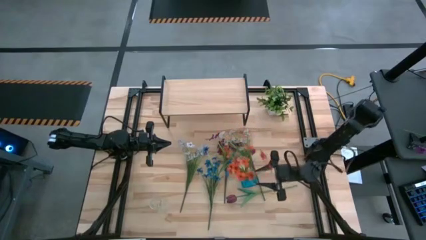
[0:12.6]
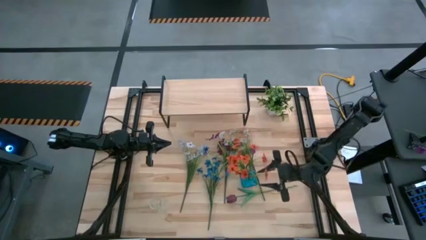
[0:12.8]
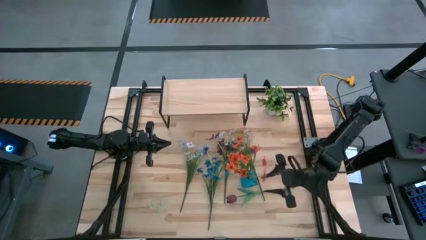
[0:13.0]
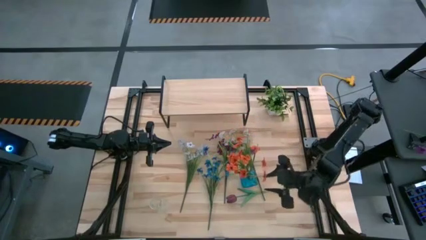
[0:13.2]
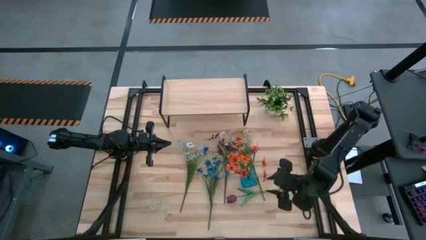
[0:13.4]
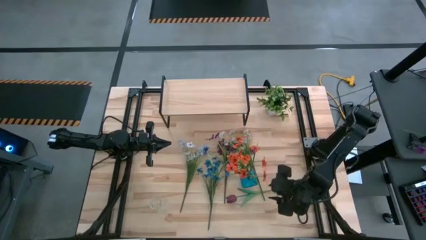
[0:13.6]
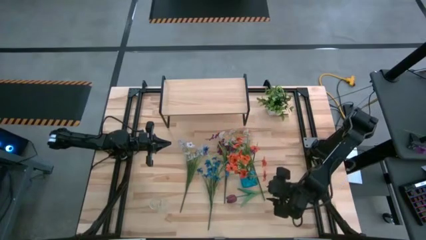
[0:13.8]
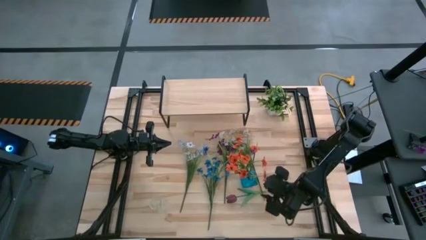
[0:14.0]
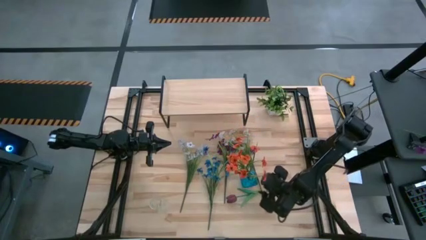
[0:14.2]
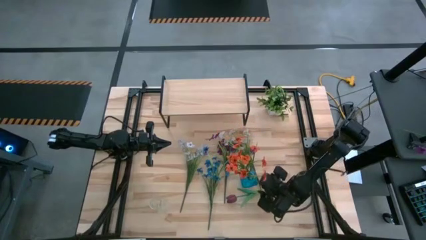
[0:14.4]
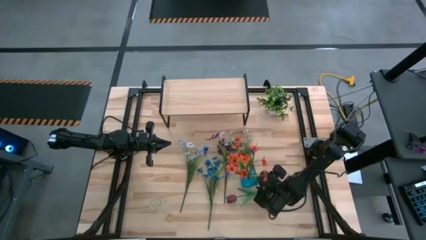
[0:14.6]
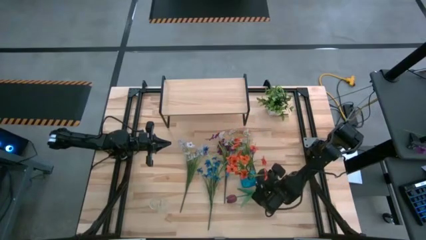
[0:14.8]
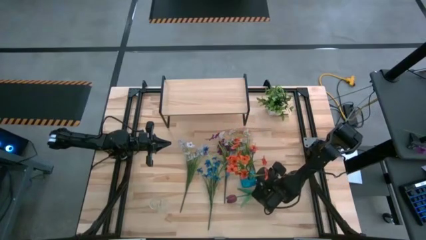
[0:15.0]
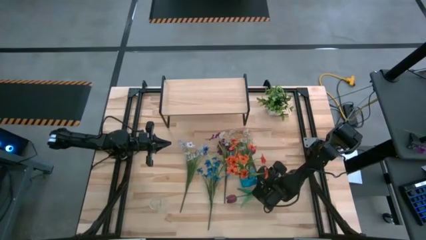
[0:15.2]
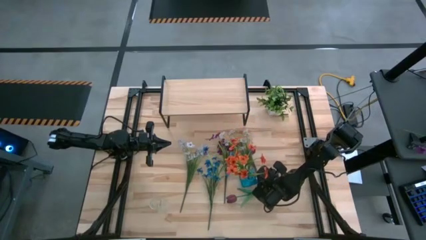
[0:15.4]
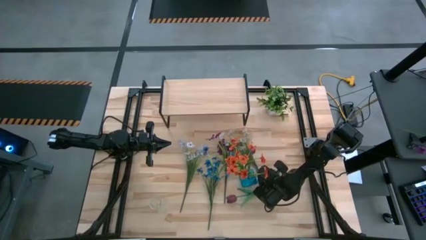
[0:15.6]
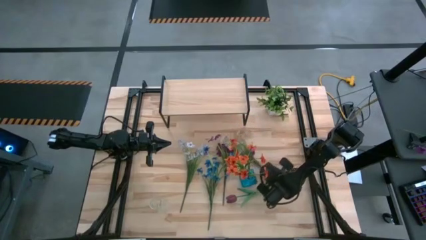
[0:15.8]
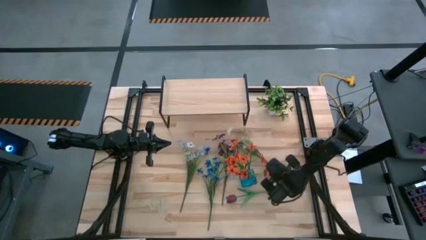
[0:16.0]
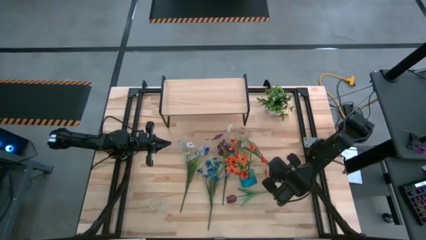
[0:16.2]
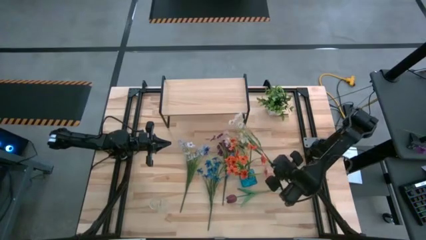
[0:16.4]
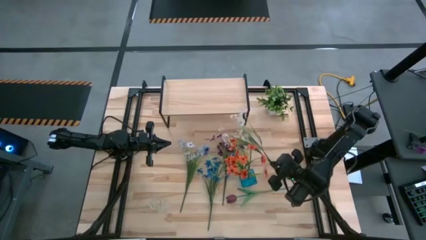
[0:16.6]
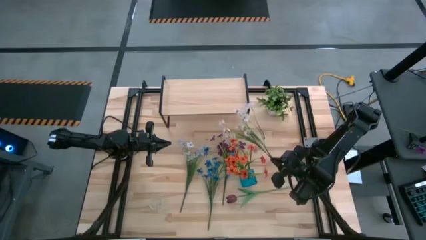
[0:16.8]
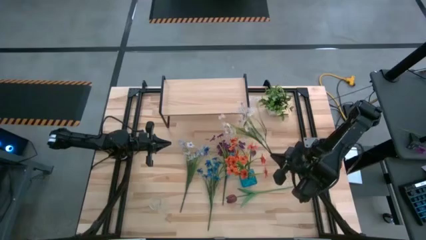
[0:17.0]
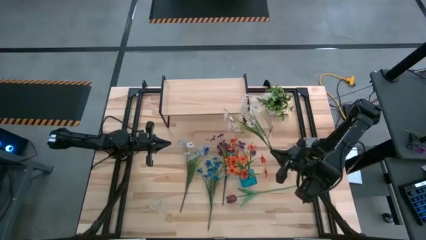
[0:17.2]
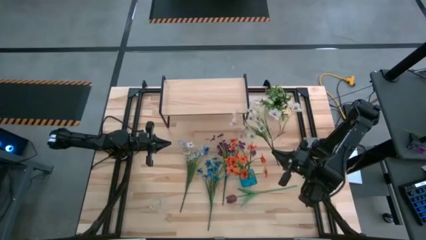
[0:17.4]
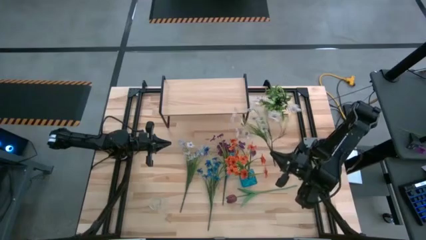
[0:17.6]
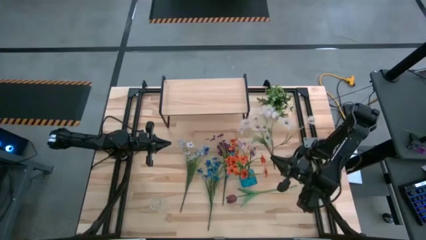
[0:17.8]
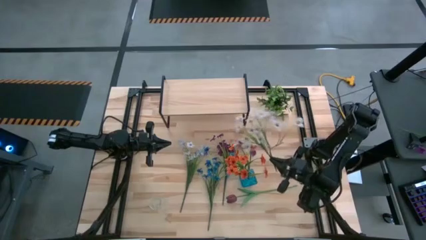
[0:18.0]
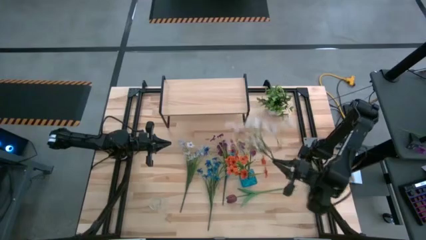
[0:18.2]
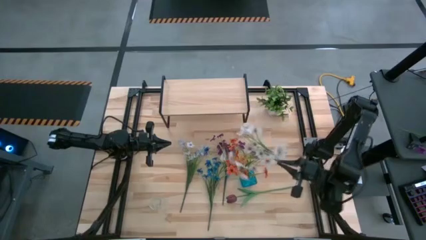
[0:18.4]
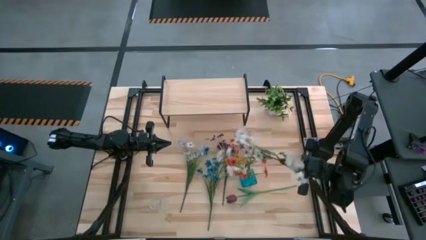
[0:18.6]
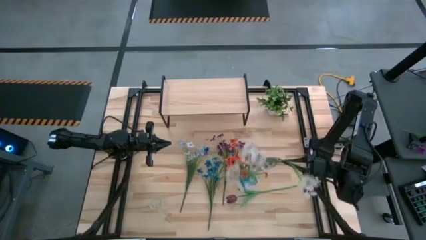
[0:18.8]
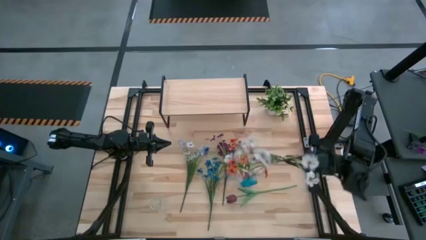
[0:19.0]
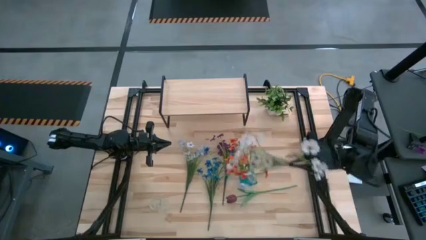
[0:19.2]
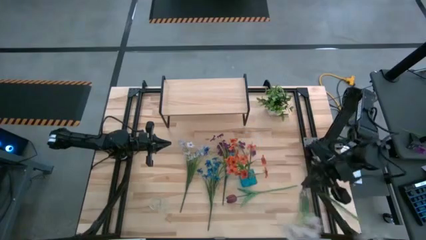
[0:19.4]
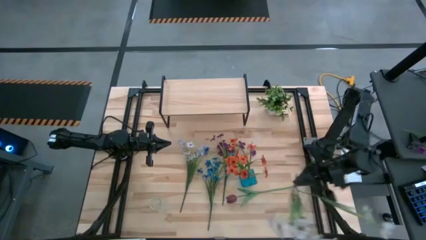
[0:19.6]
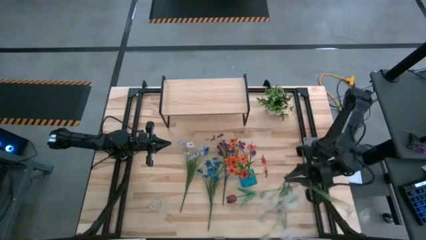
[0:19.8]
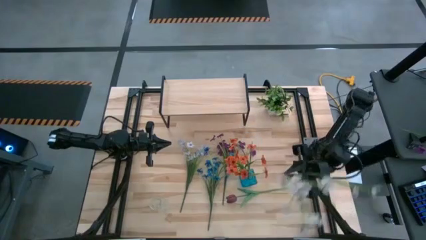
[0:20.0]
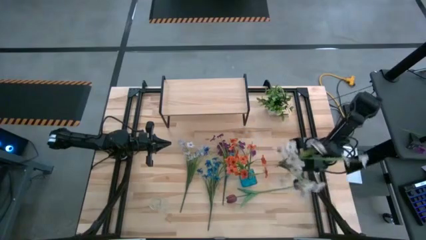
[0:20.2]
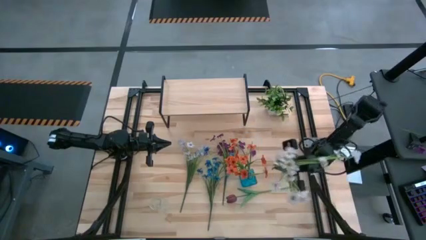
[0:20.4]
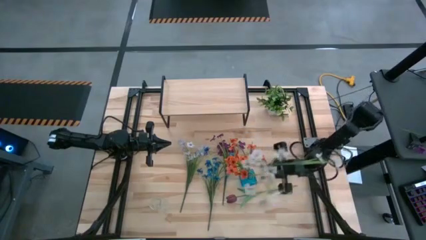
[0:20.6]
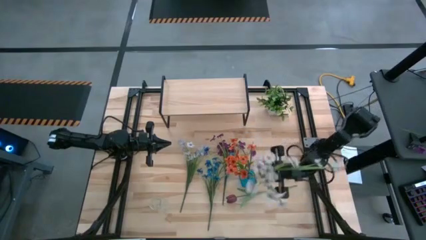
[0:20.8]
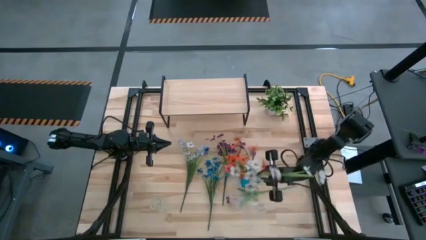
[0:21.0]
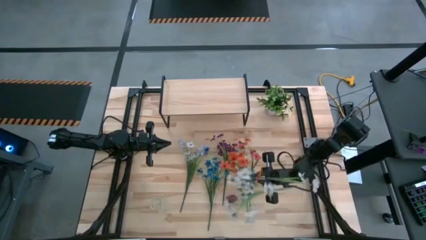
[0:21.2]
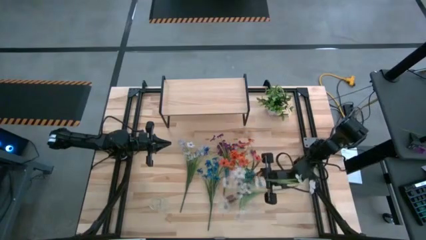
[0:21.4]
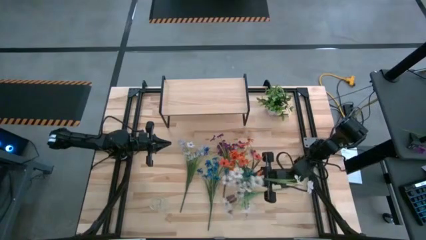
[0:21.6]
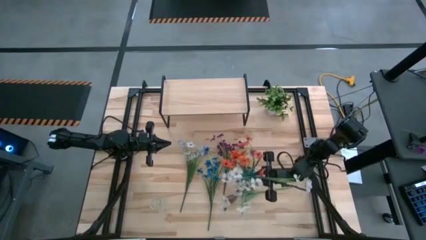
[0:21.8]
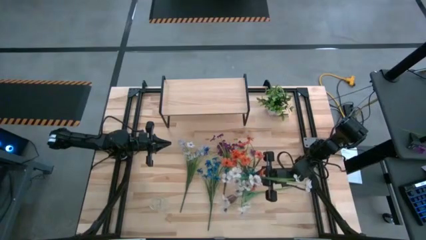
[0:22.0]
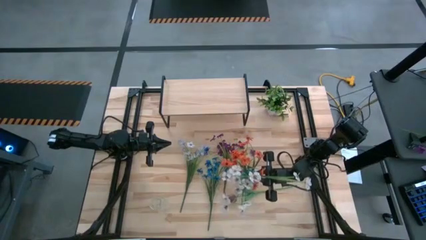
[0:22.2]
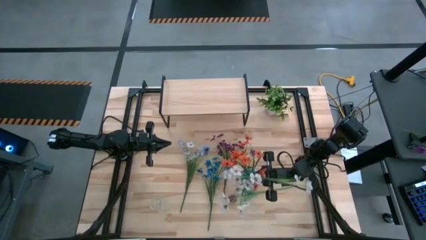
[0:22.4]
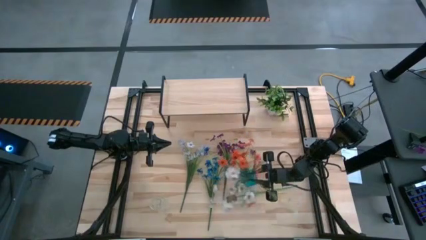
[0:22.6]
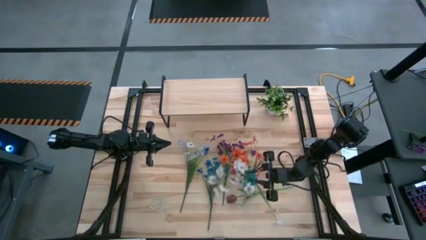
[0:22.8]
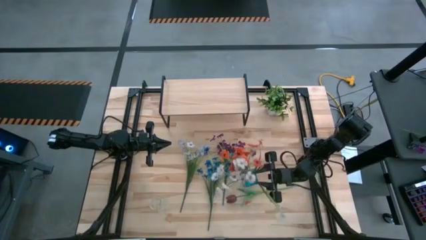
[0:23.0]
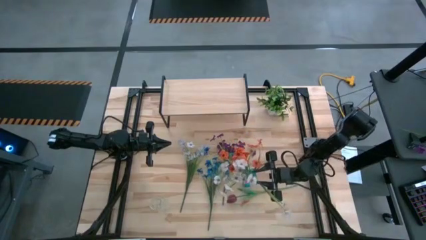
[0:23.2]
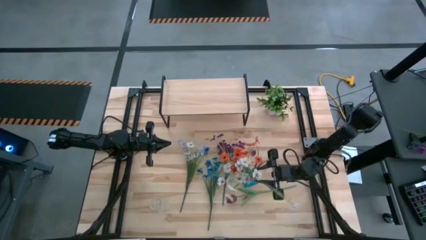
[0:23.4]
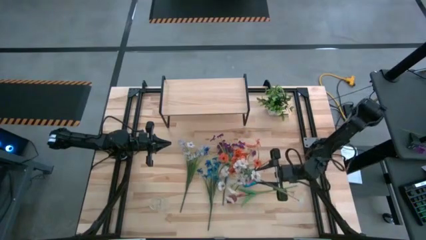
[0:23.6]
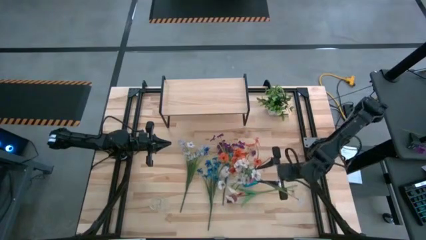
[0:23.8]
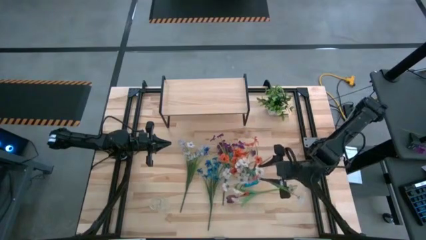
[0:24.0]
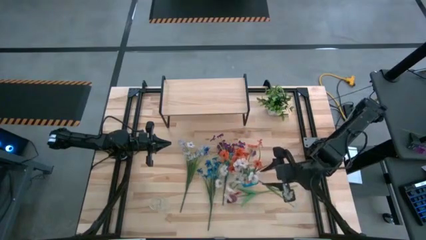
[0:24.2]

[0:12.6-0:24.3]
Task: Pick and place flowers into a vace then onto a shelf
Put the right white flowers into the blue vase

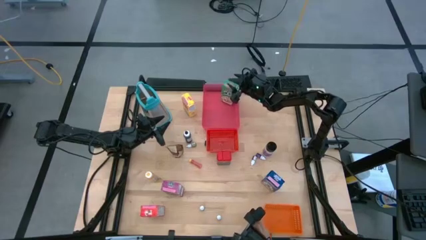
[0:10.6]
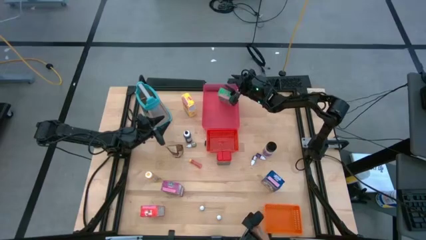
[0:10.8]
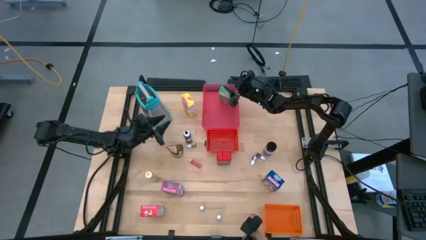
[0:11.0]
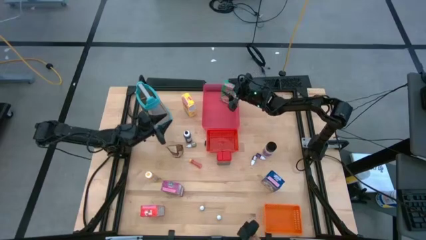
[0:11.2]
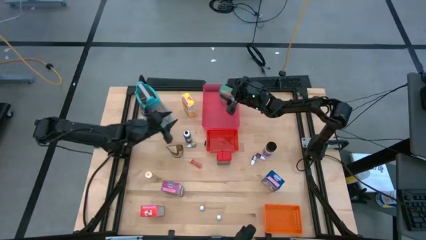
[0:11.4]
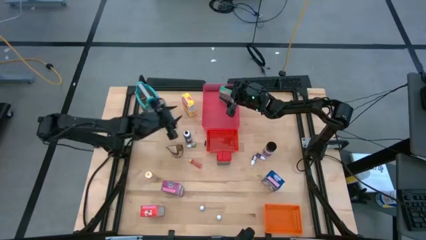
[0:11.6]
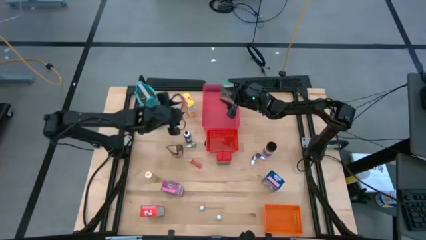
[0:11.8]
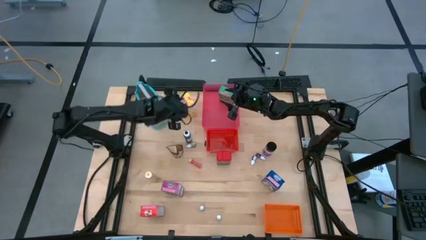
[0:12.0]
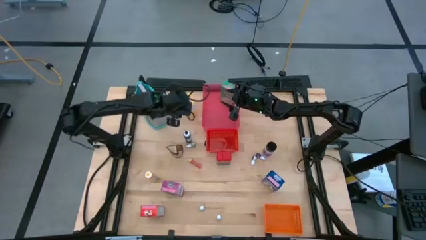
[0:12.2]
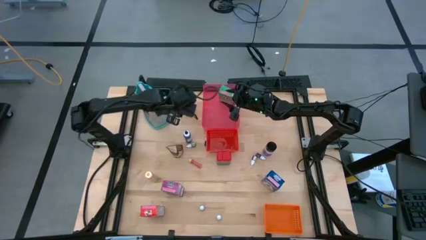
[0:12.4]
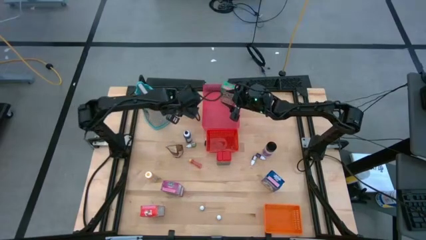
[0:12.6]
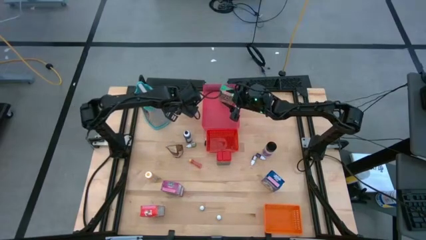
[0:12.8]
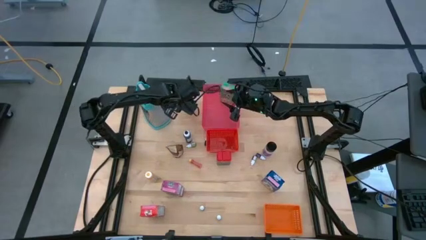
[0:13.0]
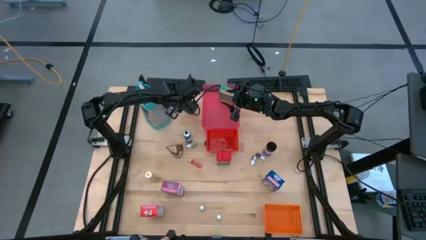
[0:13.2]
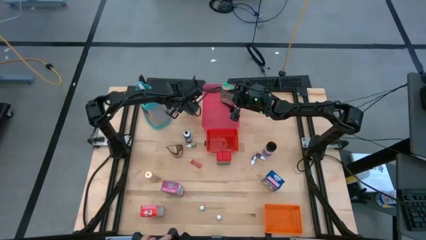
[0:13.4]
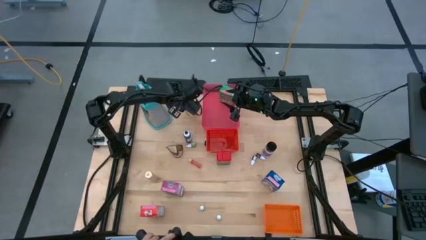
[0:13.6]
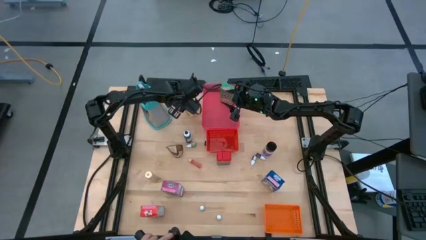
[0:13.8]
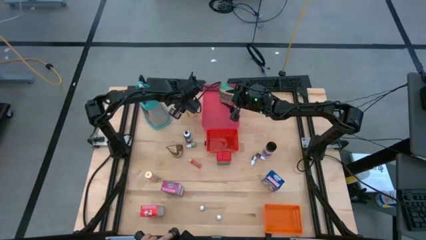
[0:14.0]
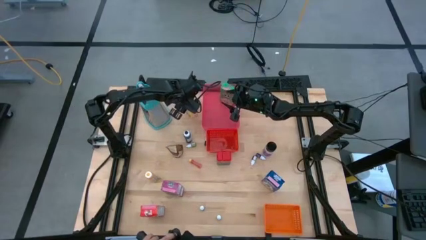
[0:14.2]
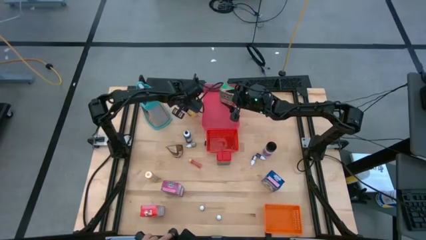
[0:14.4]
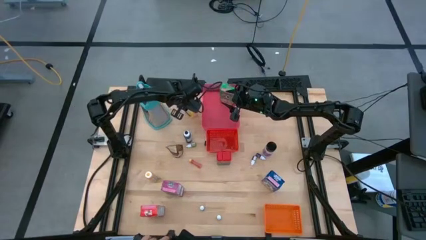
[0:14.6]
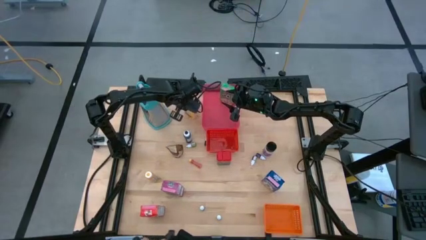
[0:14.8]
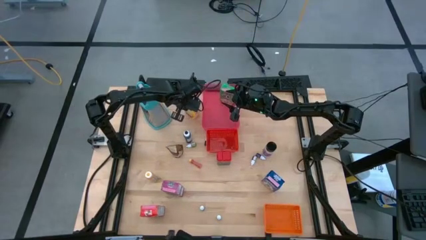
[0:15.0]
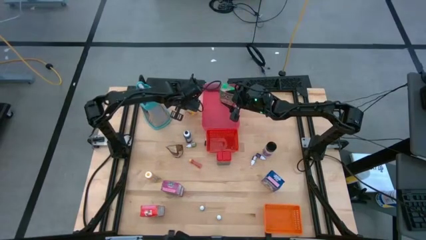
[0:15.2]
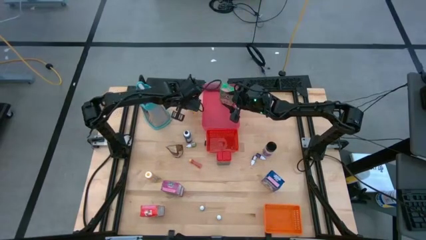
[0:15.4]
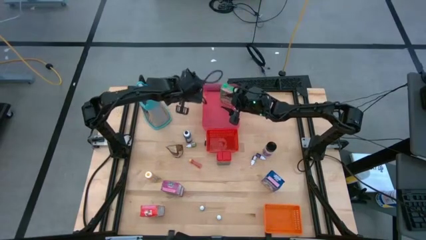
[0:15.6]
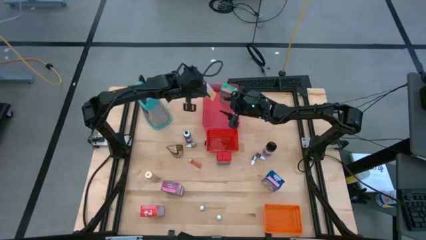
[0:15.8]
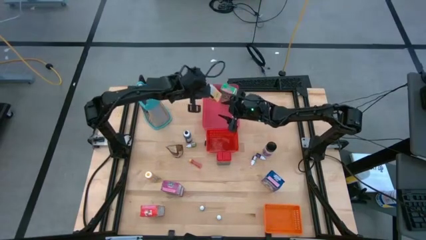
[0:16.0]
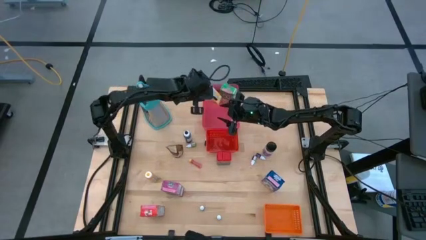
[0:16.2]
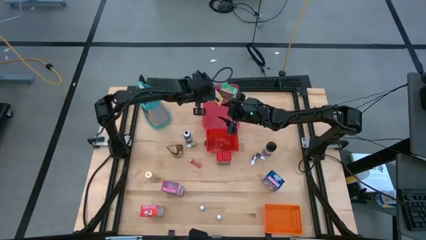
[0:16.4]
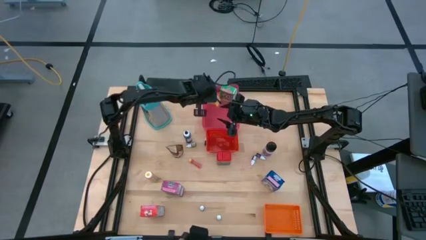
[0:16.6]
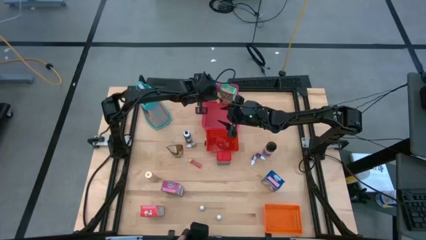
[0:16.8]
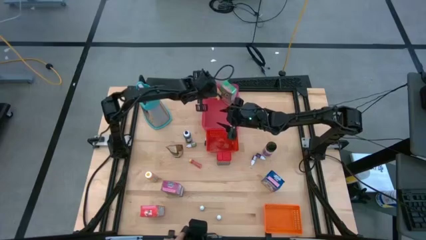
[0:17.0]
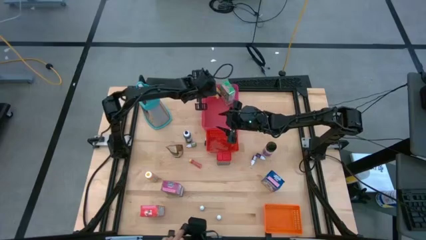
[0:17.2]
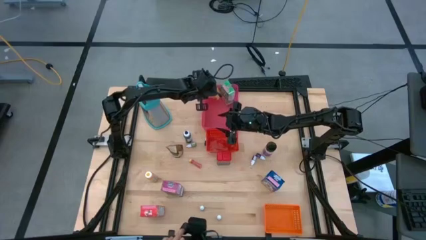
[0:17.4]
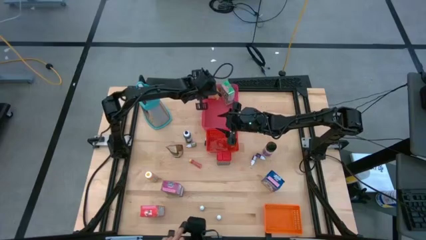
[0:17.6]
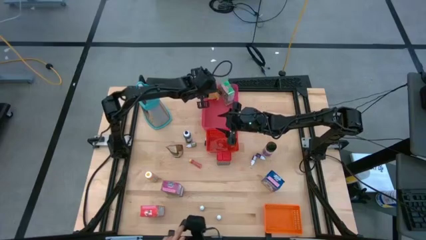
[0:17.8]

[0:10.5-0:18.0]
Task: Pick & Place Kitchen Items
Put the yellow cereal box into the pink bin
